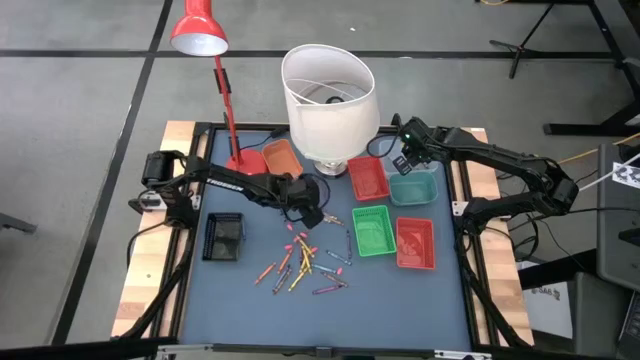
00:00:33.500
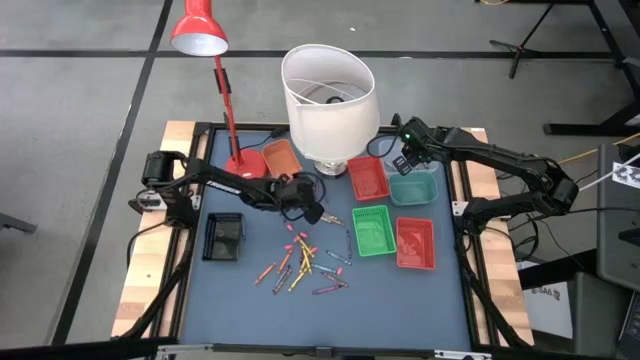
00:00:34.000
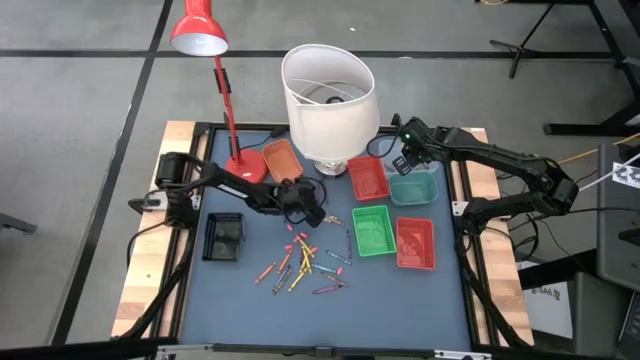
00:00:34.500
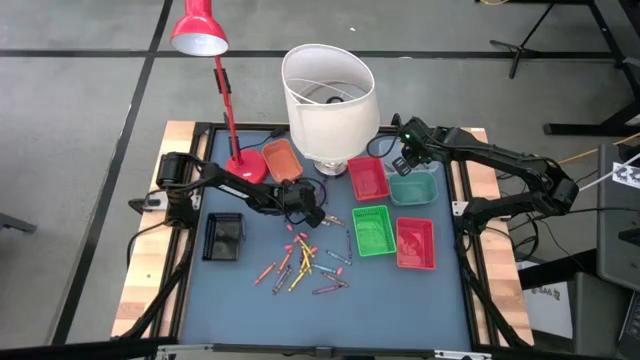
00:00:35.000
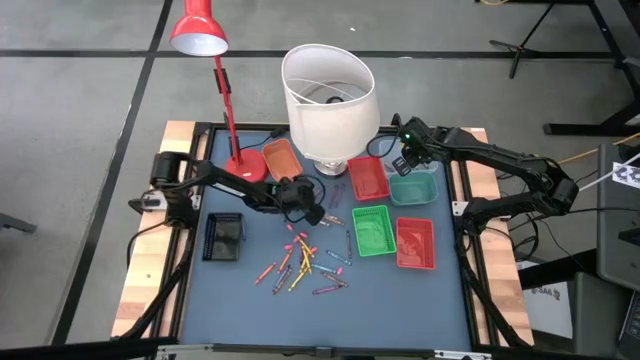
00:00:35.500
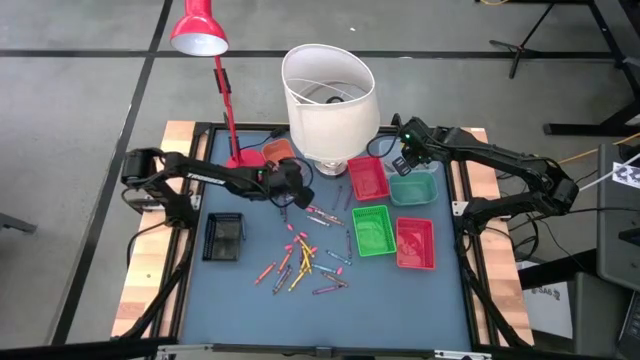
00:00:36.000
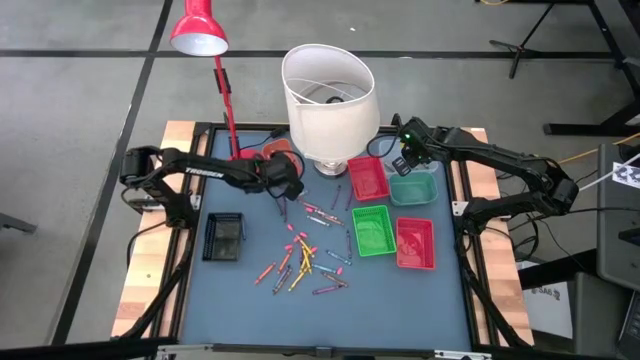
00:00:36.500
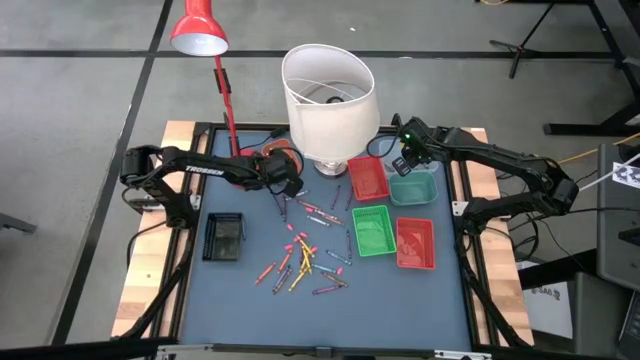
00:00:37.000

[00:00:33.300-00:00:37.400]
Task: Sort crayons
Put the violet crayon into the orange bin

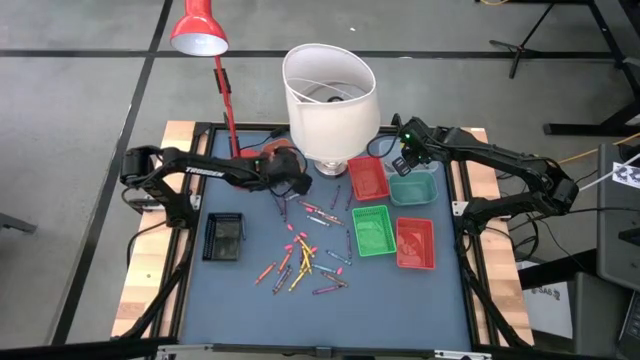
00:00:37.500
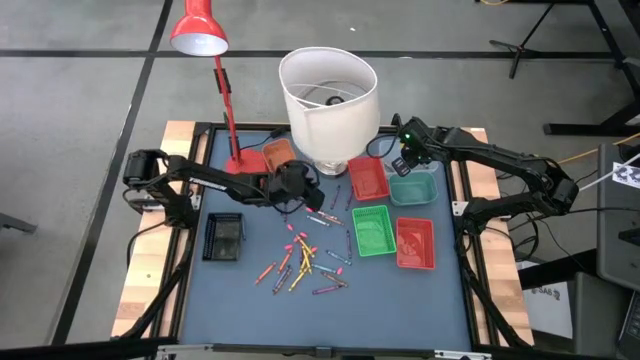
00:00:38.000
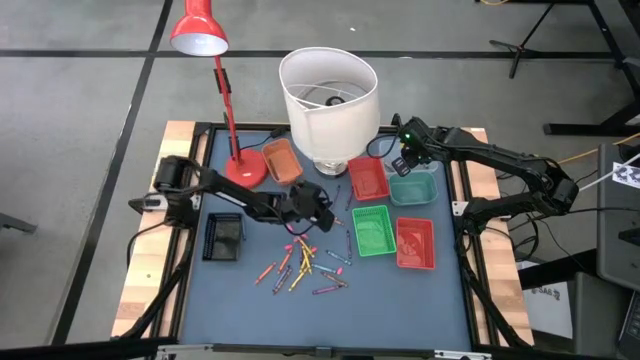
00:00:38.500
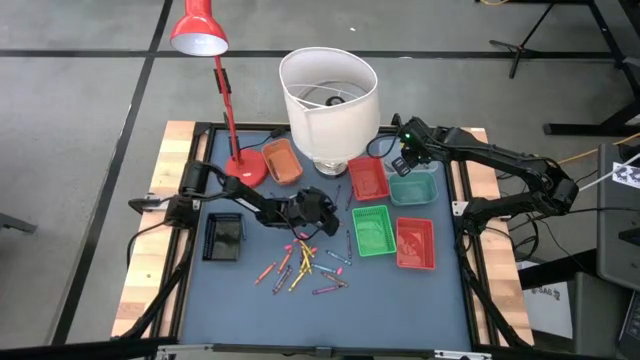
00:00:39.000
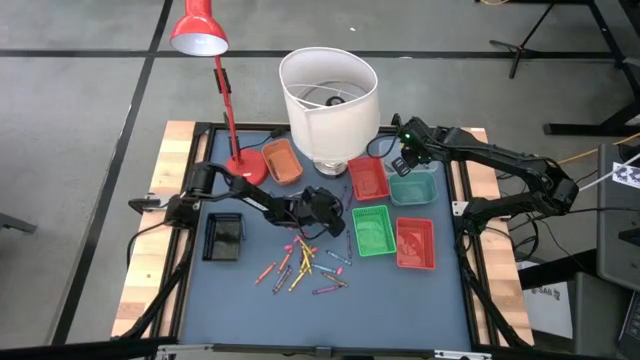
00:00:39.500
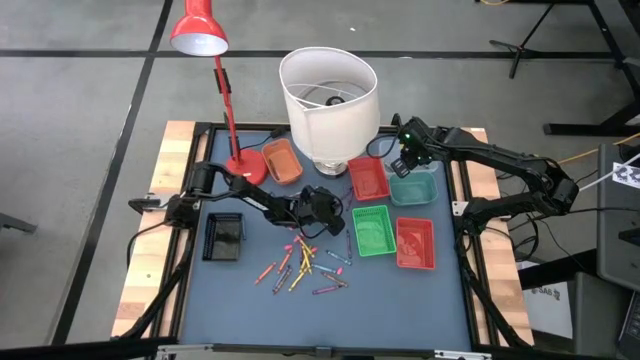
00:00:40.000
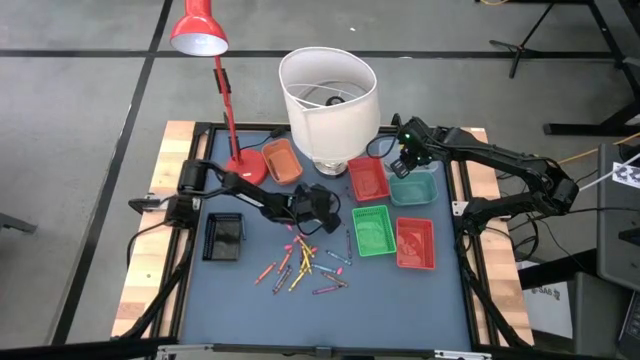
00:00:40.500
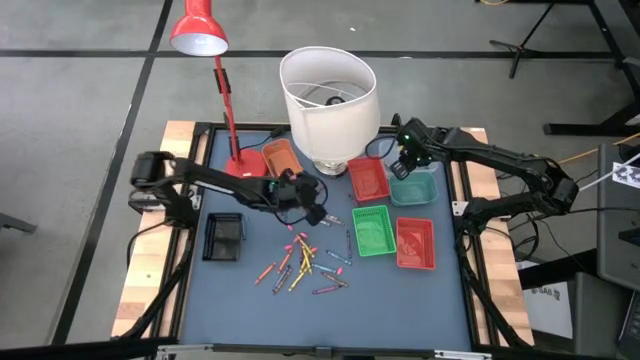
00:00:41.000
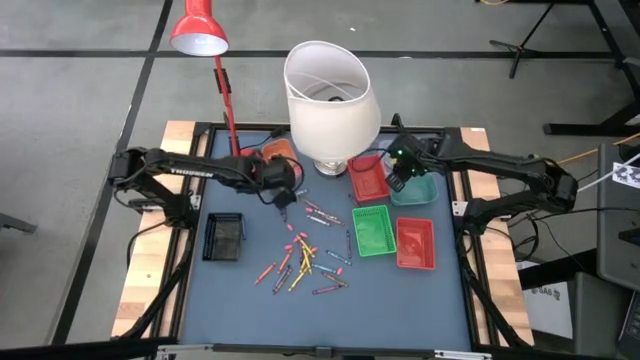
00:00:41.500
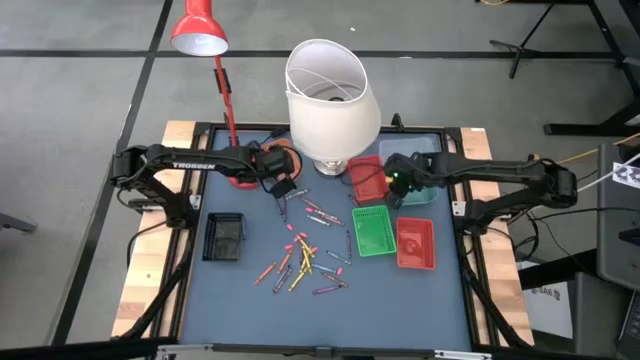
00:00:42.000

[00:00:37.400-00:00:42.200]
Put the violet crayon into the orange bin

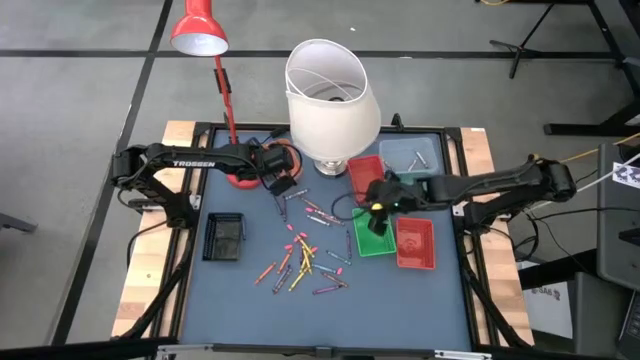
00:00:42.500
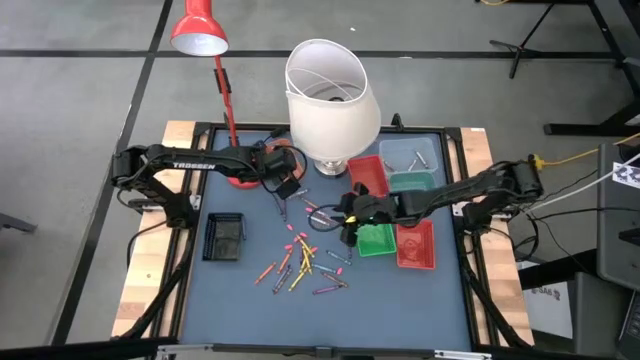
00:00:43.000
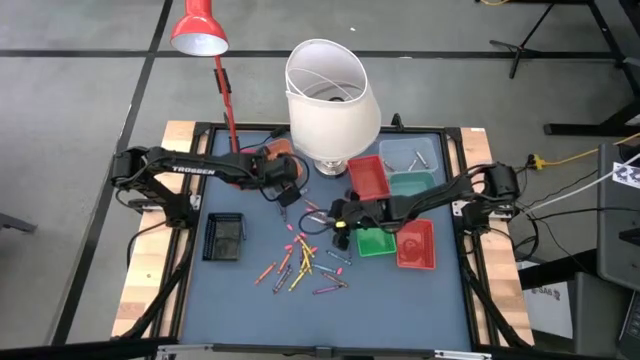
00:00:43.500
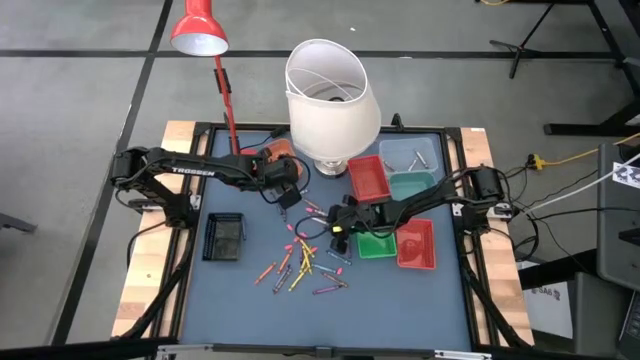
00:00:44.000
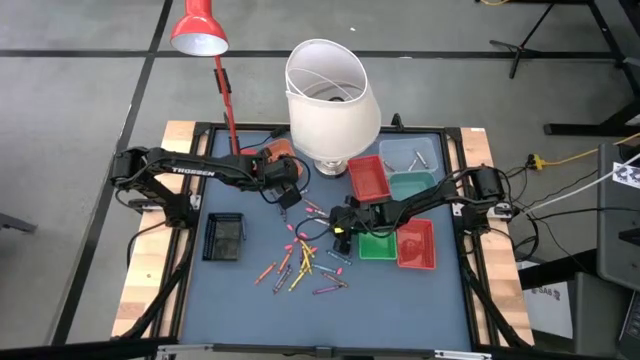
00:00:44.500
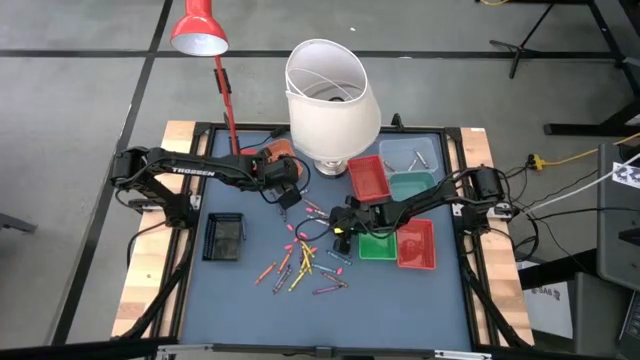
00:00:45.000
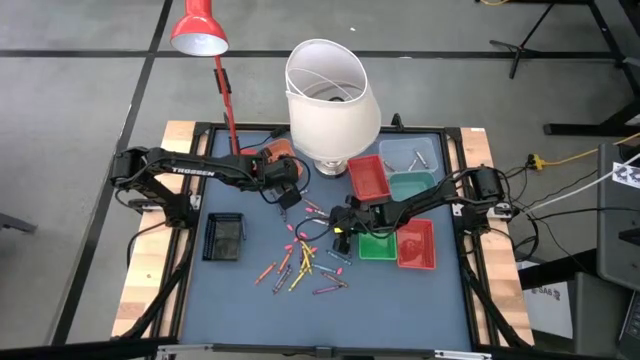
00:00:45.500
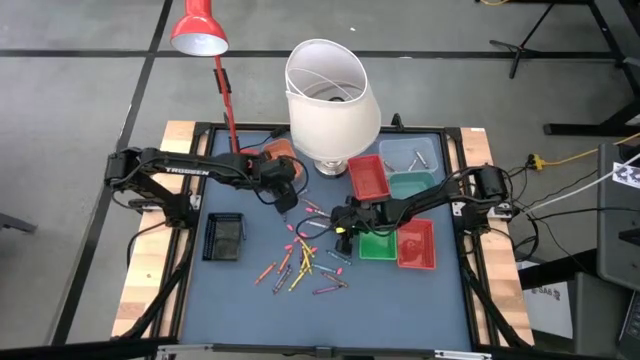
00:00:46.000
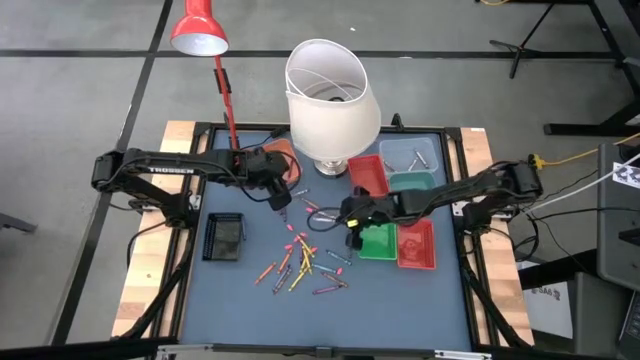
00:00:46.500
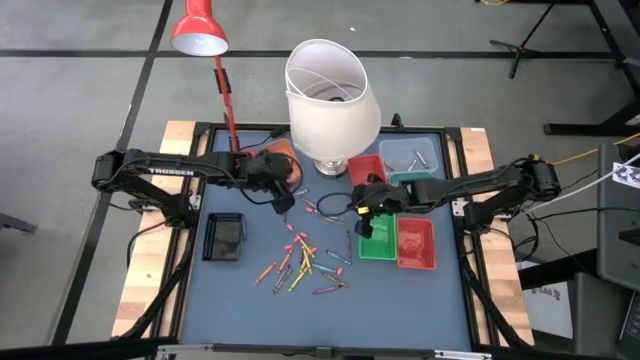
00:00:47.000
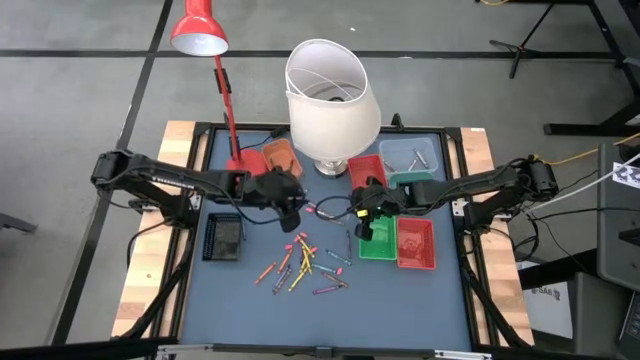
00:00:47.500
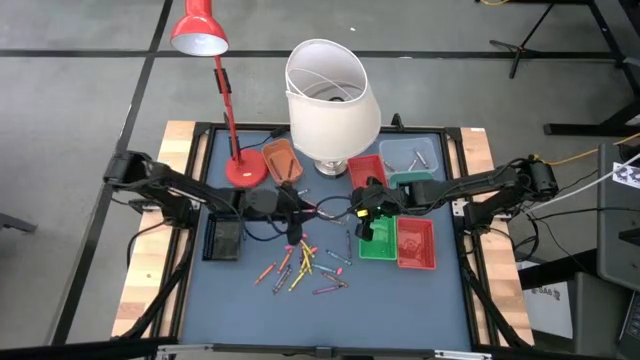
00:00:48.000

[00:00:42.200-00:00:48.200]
Put the gray crayon into the transparent bin

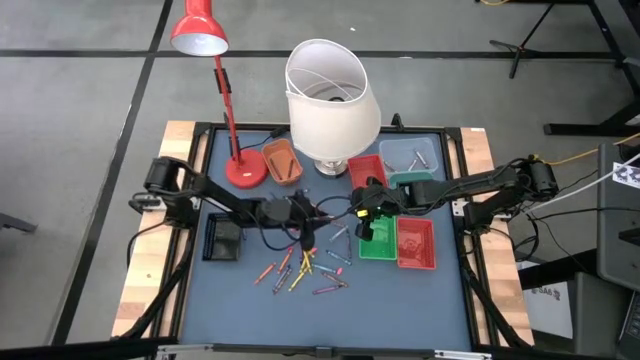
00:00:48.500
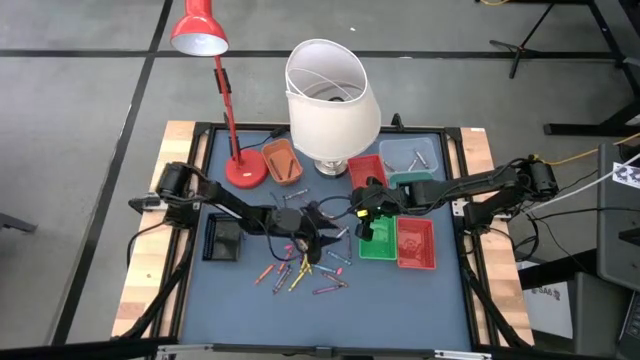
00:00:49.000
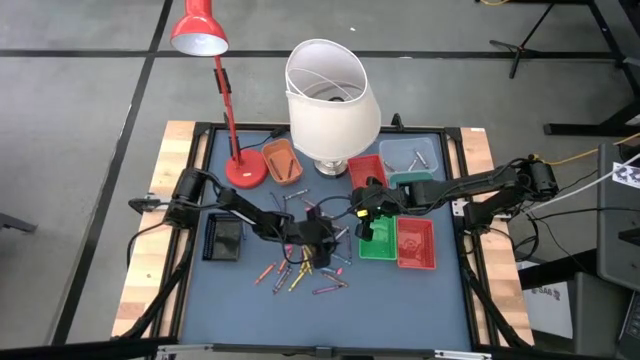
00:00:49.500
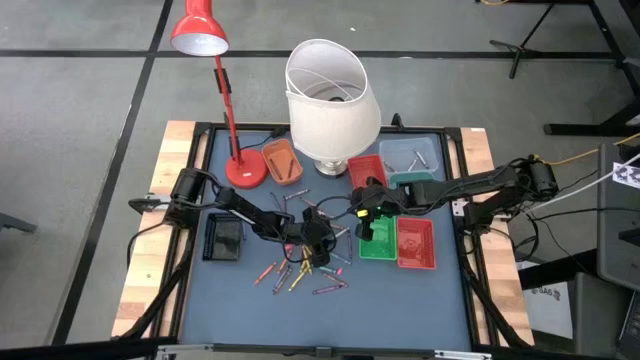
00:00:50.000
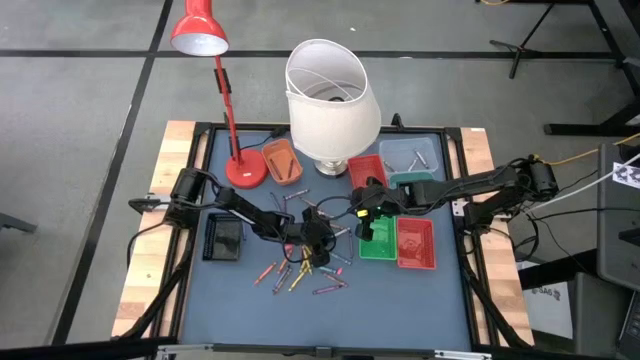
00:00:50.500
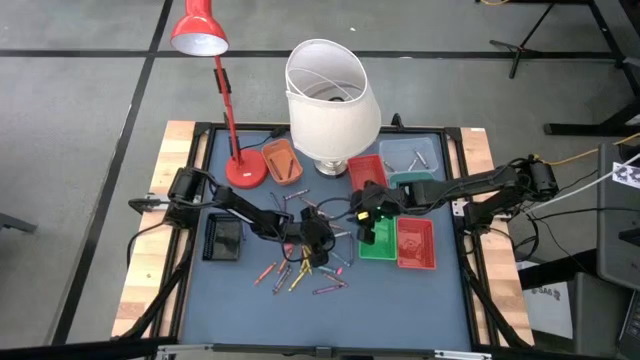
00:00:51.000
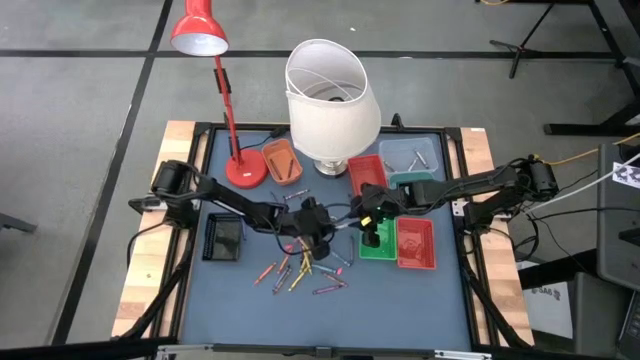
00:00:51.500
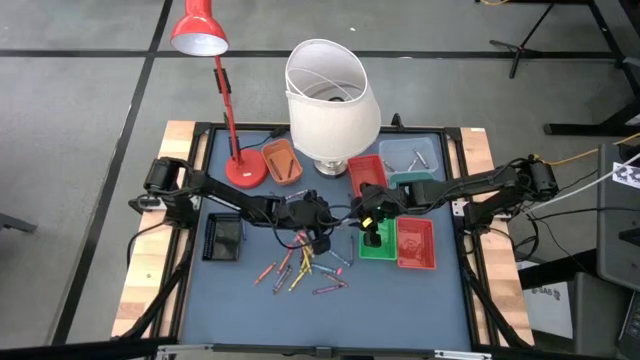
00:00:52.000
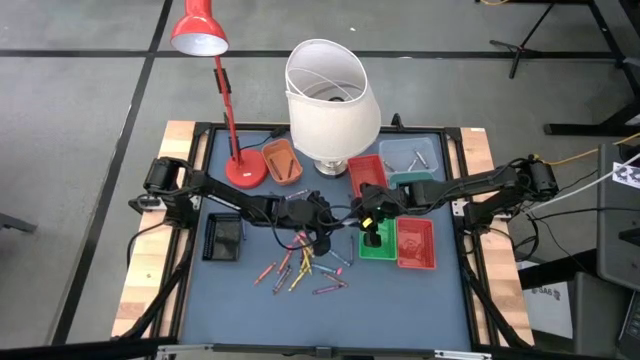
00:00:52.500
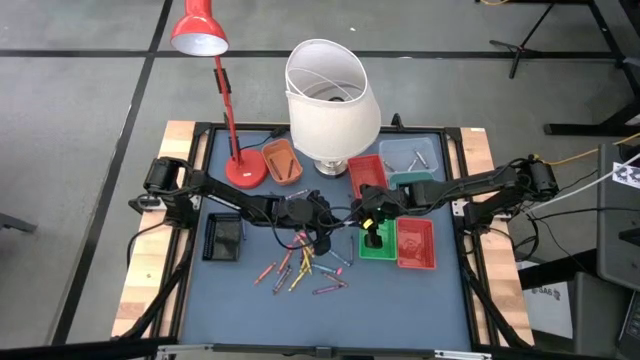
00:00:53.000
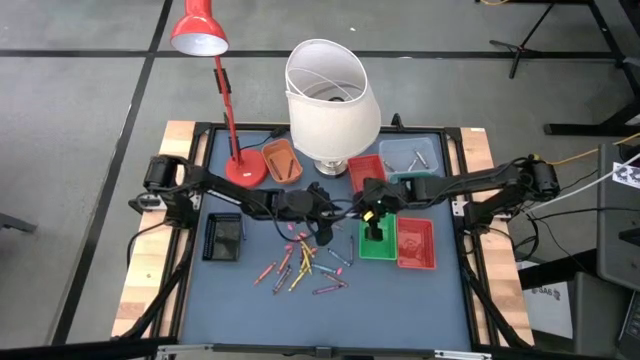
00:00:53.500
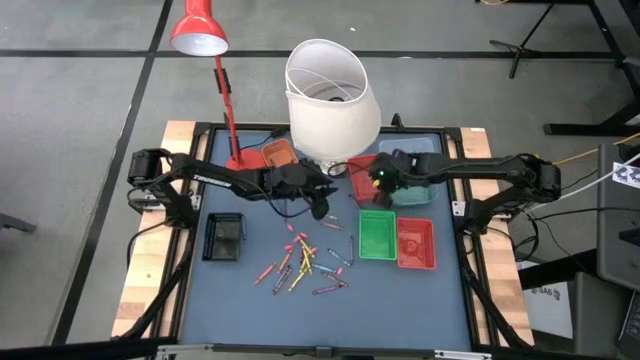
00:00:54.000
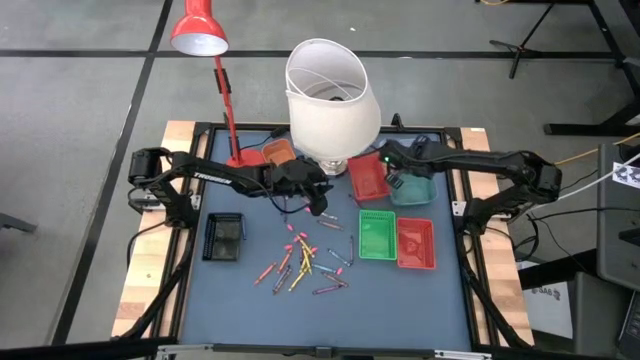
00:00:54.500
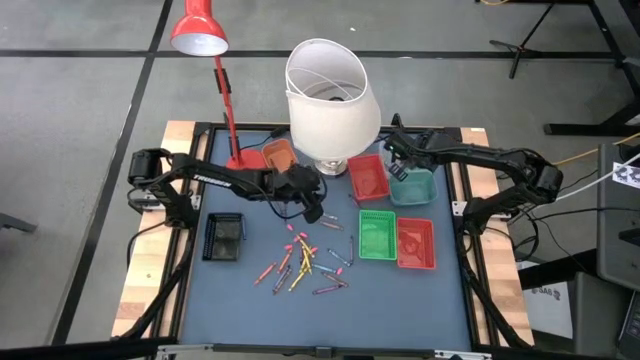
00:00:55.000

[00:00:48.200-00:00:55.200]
Put the gray crayon into the transparent bin
